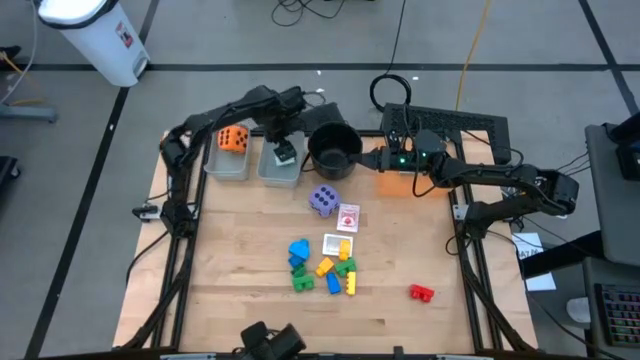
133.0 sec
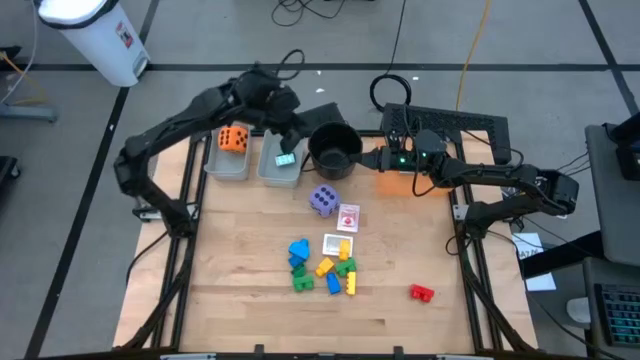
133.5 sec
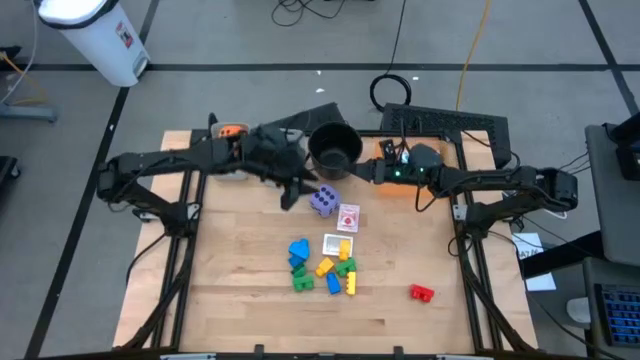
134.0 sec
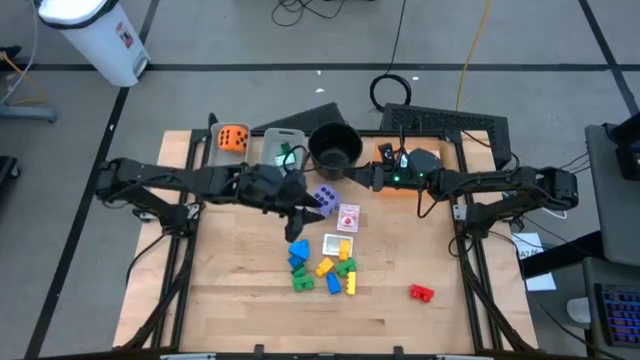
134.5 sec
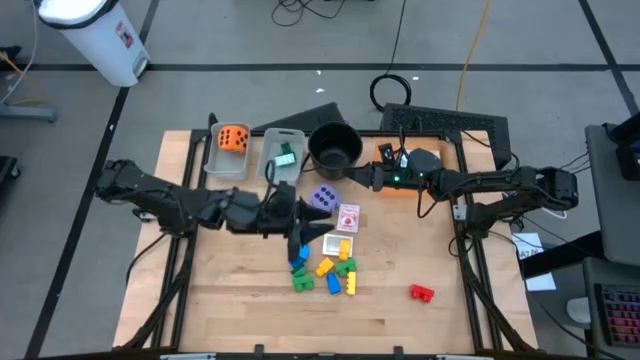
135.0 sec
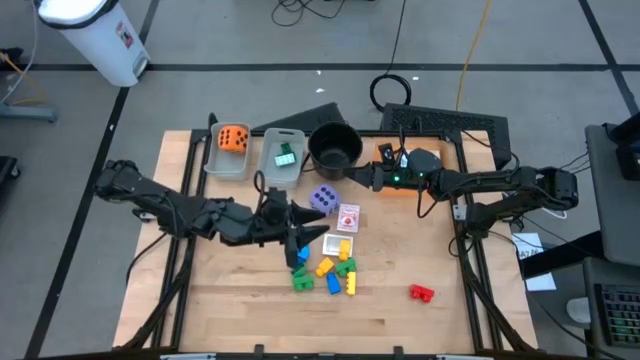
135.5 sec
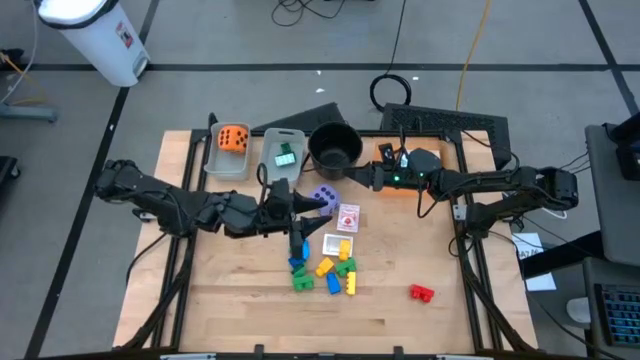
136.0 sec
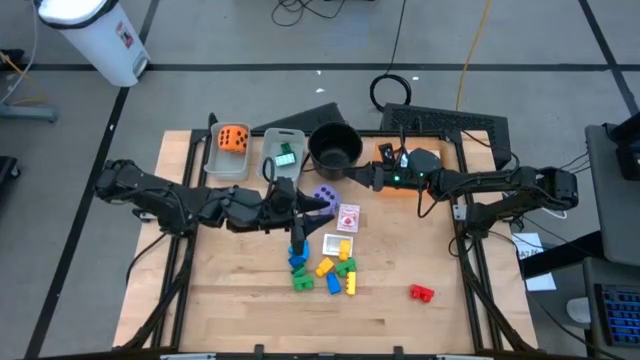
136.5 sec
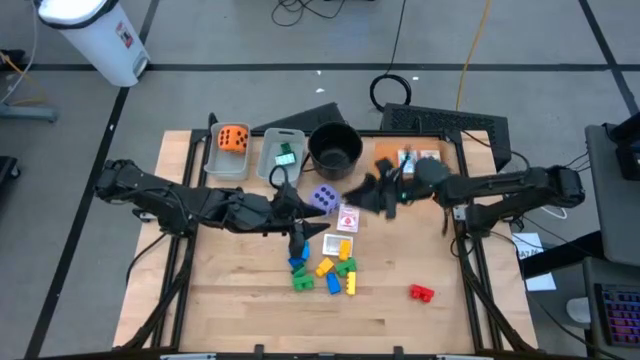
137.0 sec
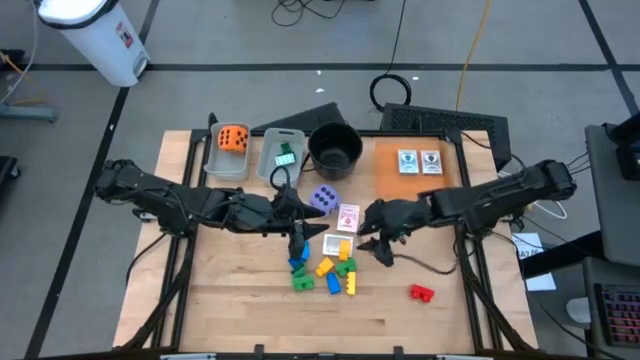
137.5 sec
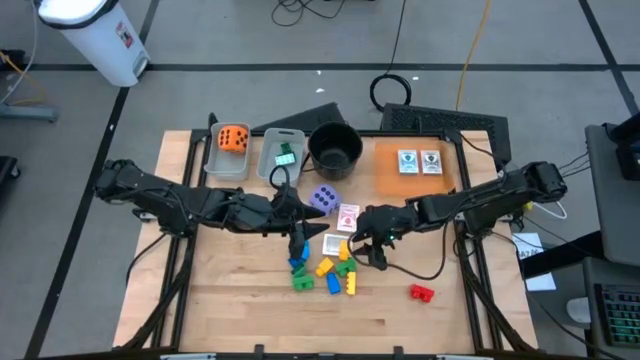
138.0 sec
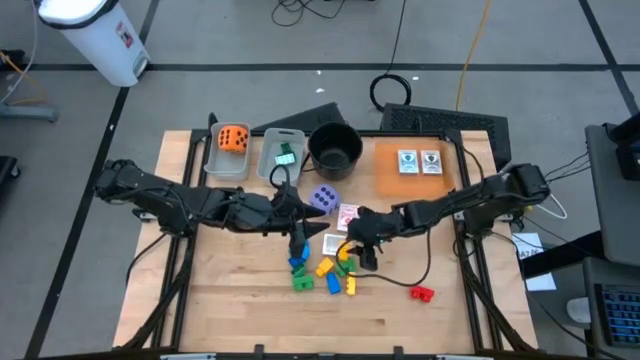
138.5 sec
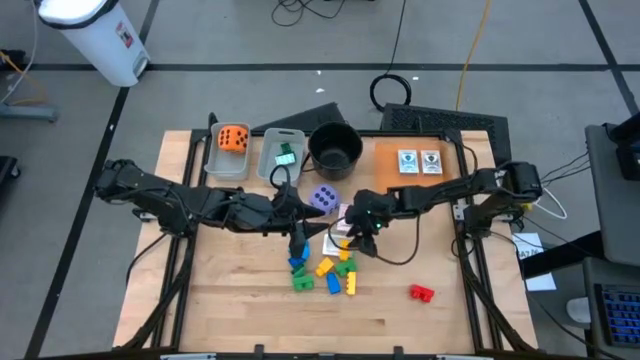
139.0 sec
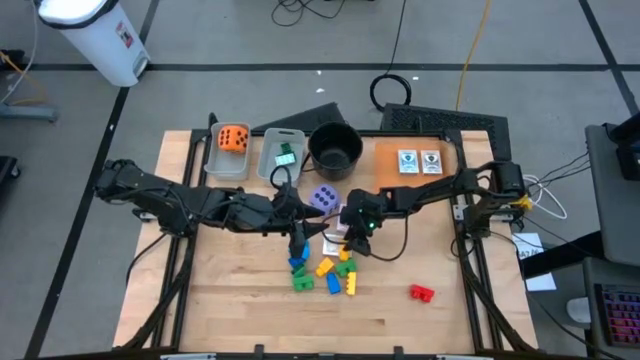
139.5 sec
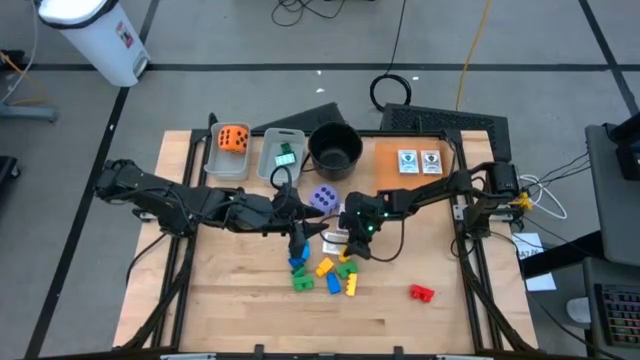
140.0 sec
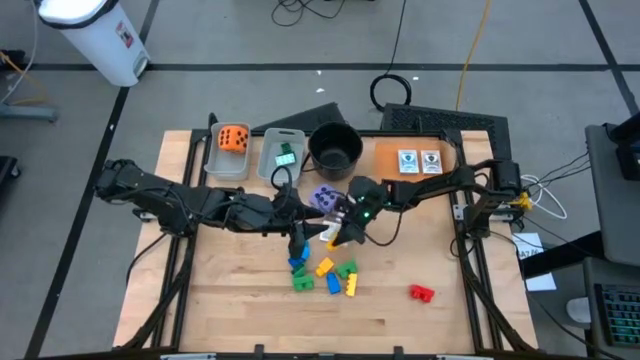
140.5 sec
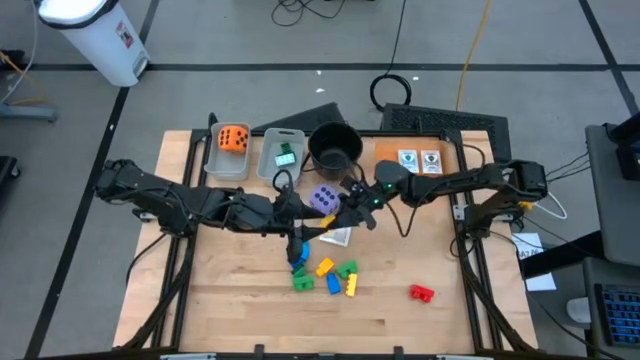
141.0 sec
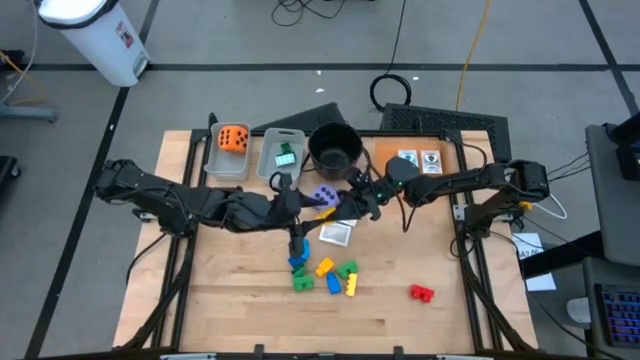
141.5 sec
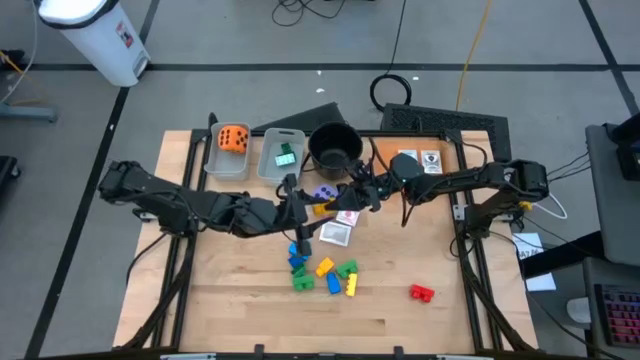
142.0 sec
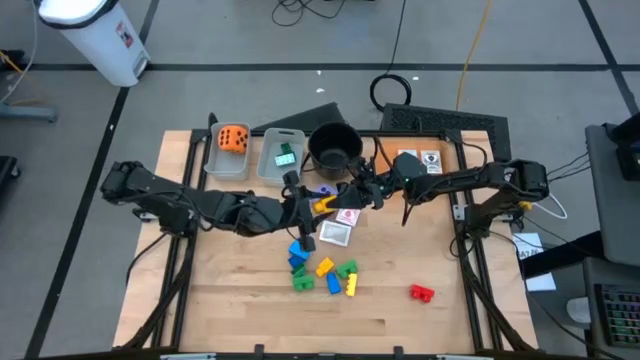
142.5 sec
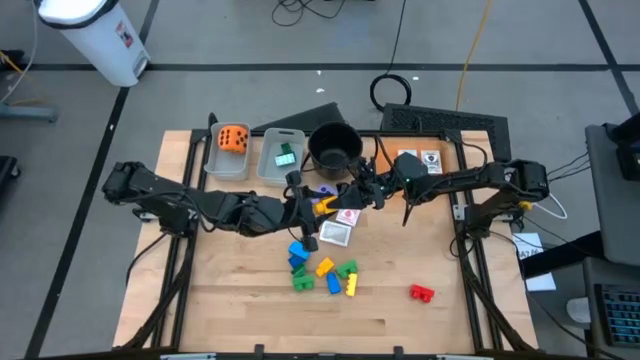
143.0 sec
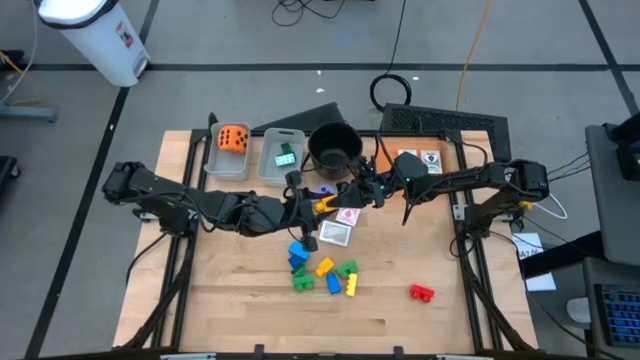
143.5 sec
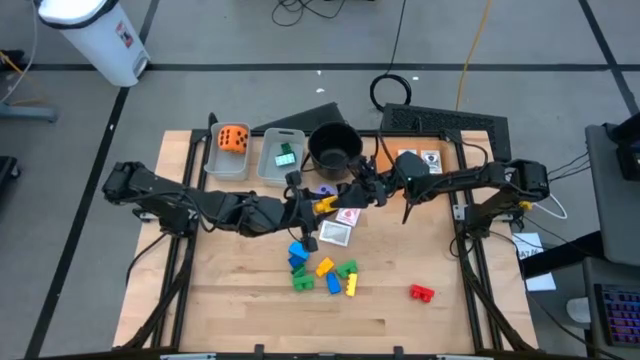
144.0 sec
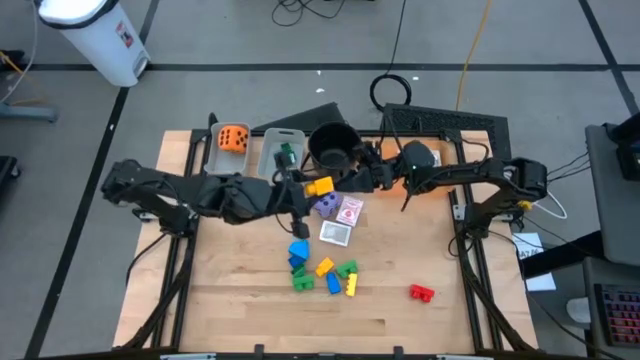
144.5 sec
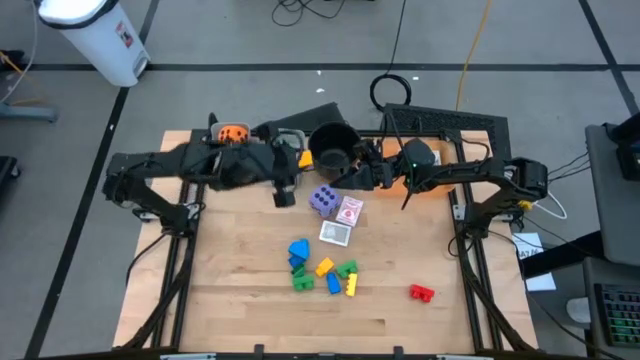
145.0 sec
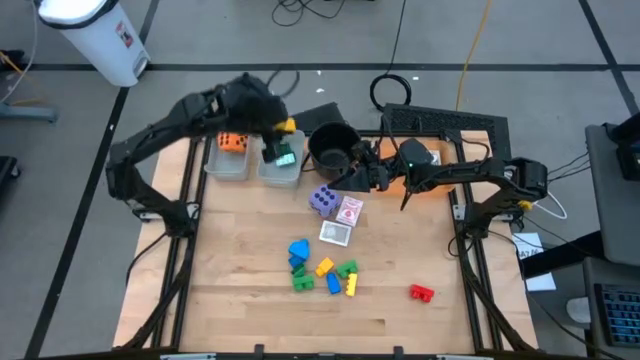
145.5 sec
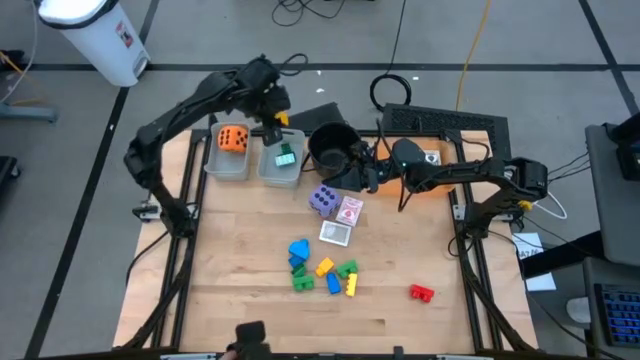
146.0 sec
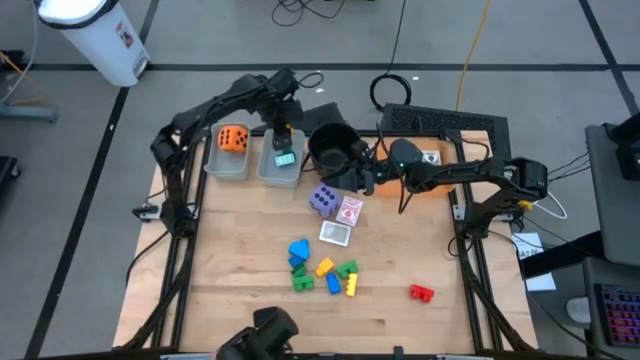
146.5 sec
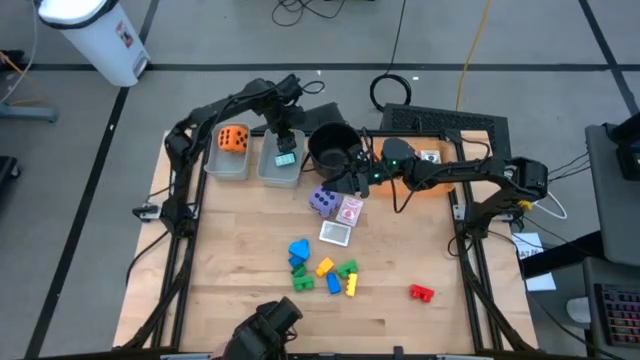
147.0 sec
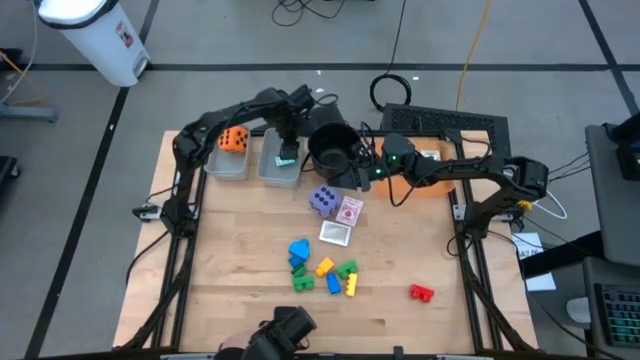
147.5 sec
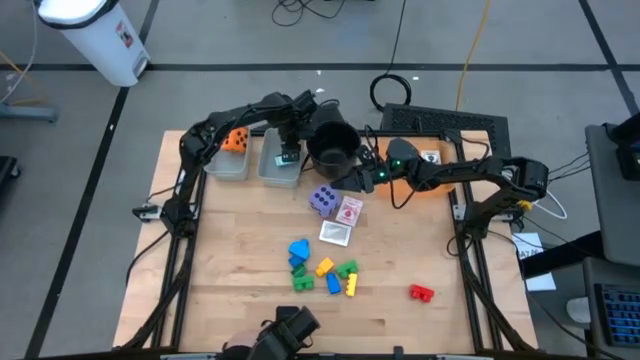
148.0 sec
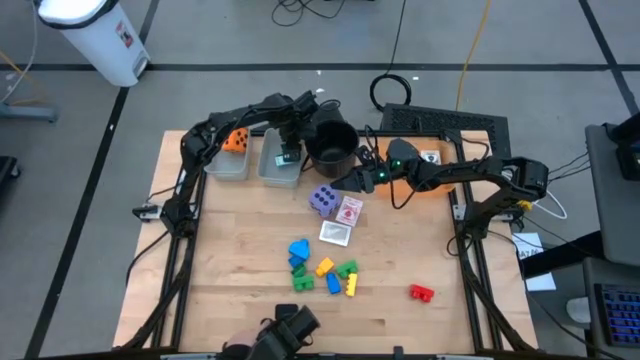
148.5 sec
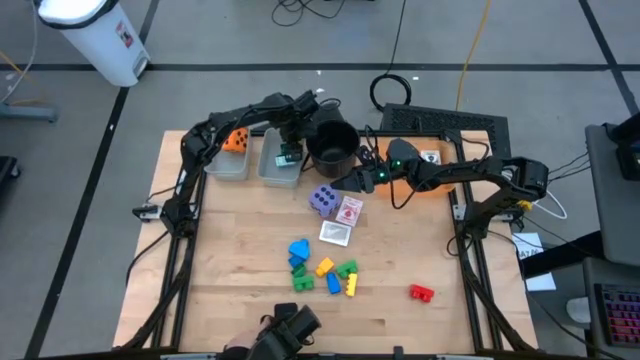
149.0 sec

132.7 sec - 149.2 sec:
Task: Pick & Place Toys
Put the yellow game piece into the right gray bin

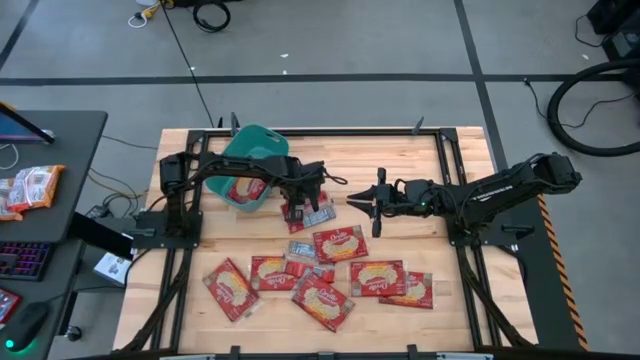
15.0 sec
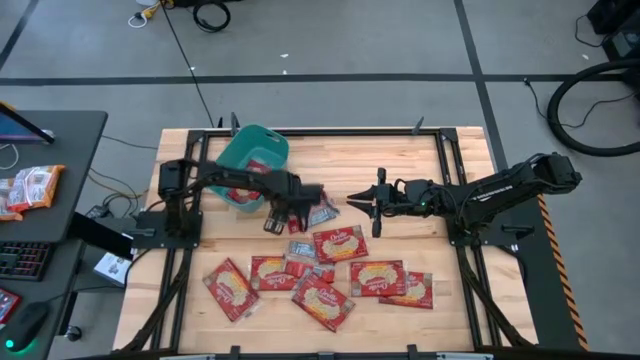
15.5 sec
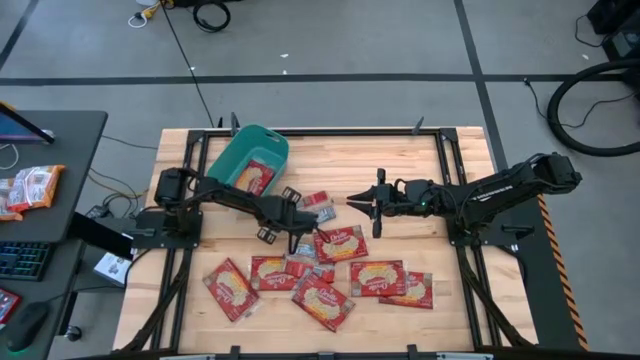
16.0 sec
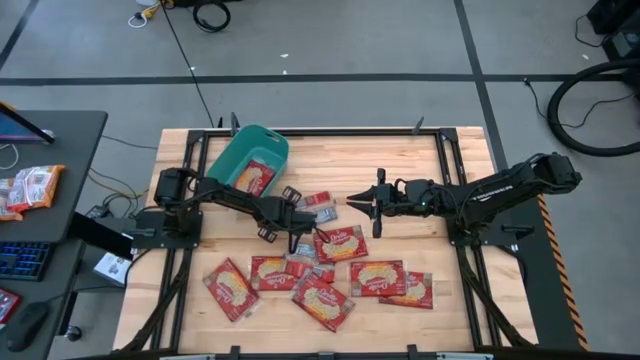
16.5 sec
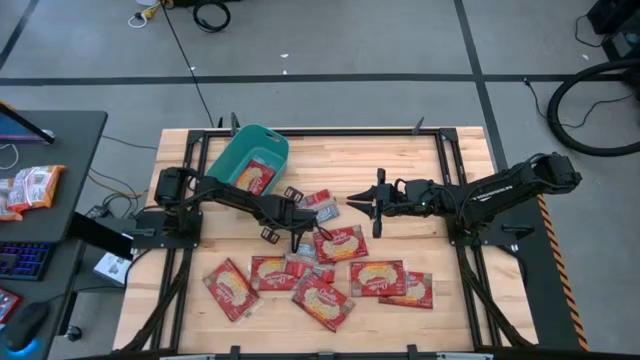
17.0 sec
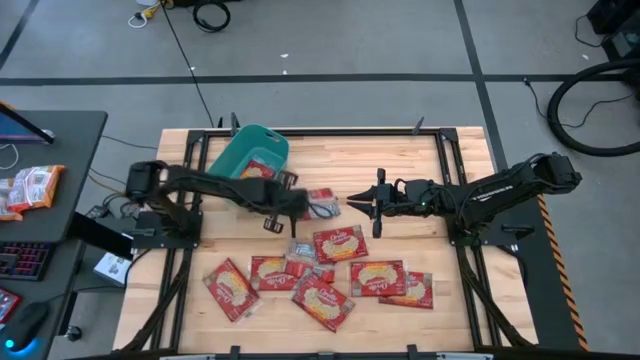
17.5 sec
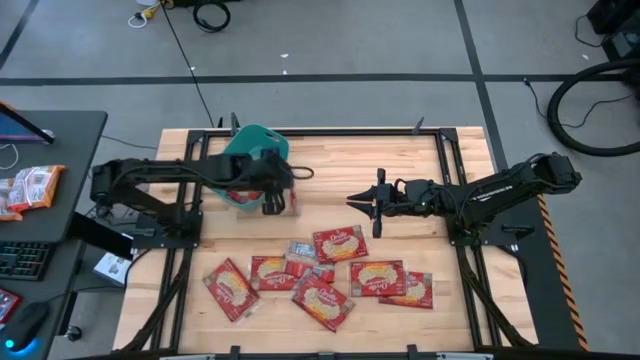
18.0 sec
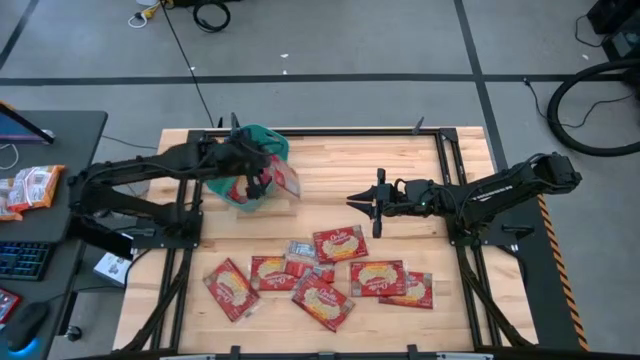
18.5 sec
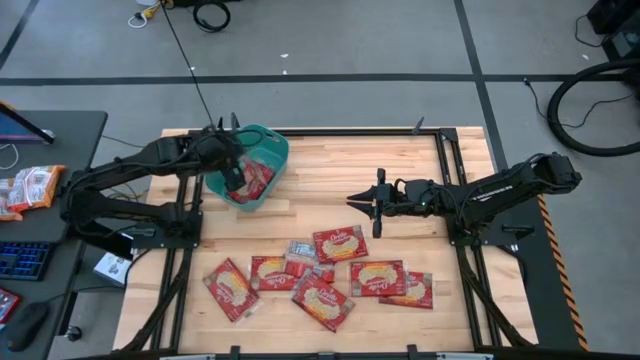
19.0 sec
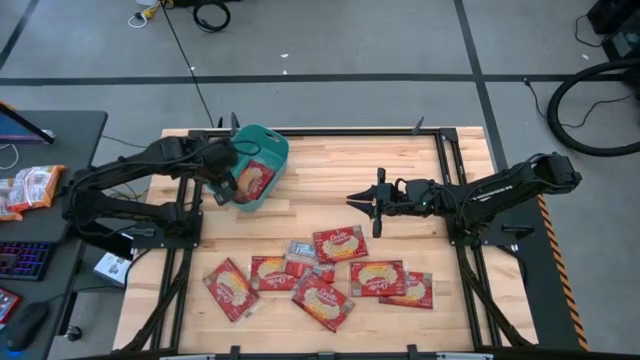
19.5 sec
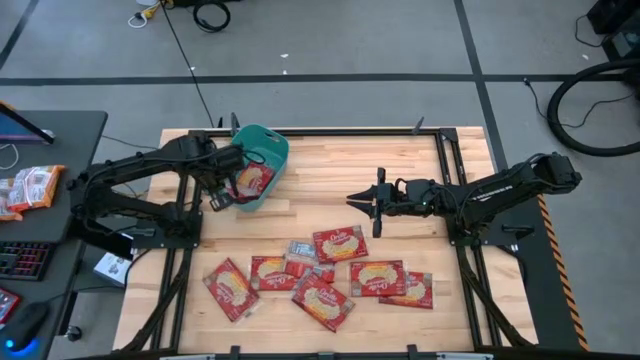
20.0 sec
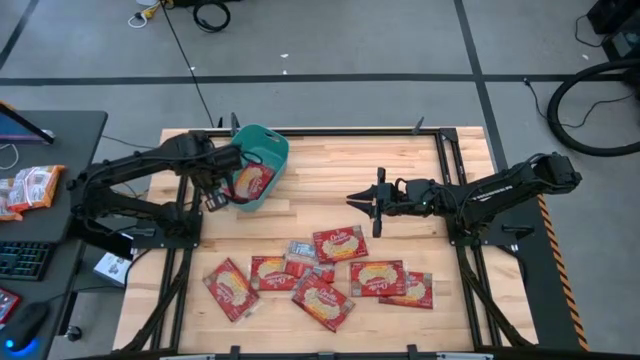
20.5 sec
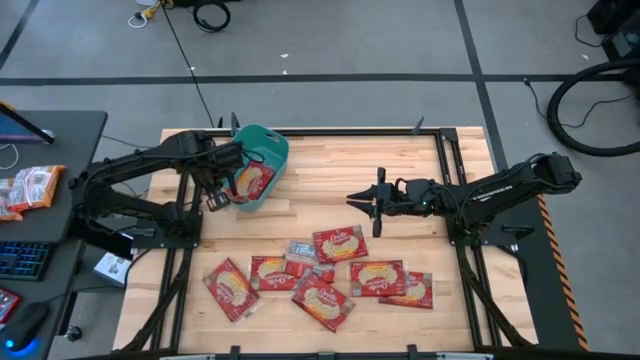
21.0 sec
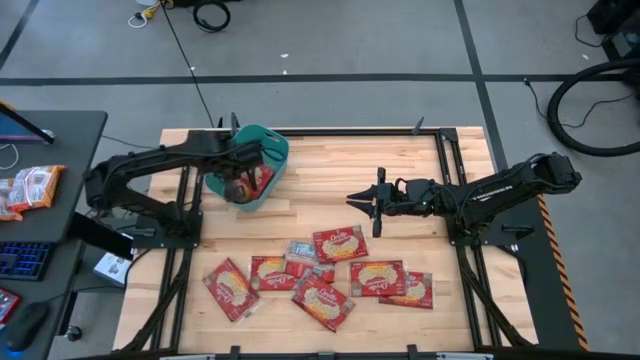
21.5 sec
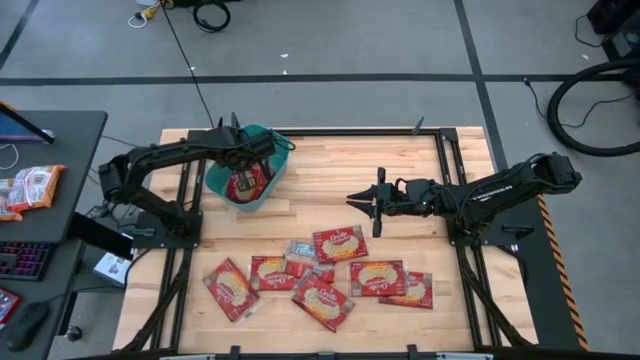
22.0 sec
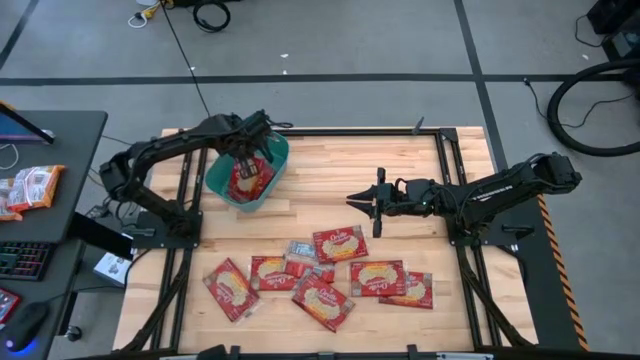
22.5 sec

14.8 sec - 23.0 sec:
Task: Sort popcorn bags into baskets
Put the red popcorn bag into the green bin
